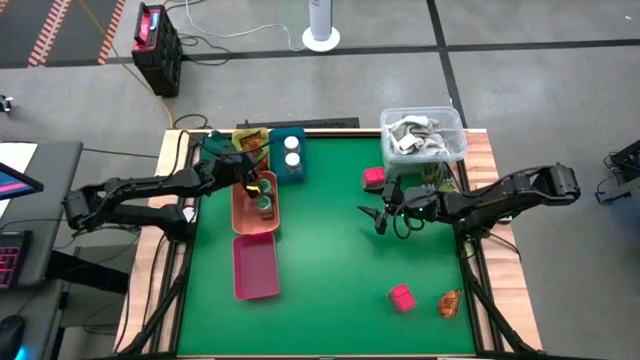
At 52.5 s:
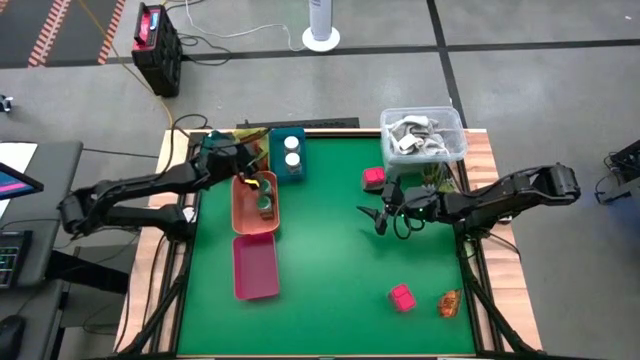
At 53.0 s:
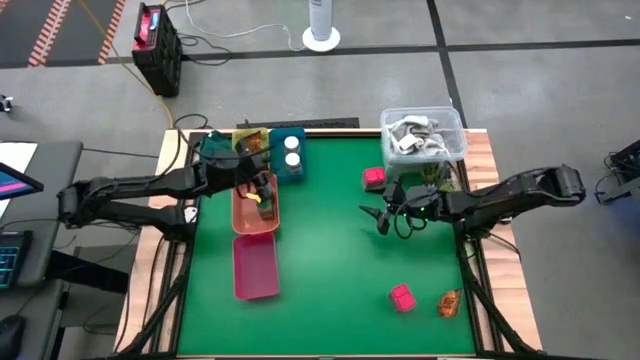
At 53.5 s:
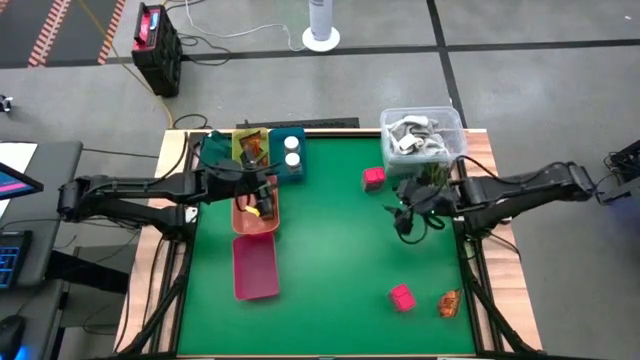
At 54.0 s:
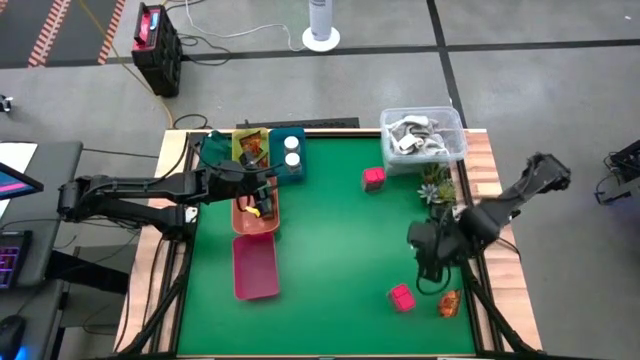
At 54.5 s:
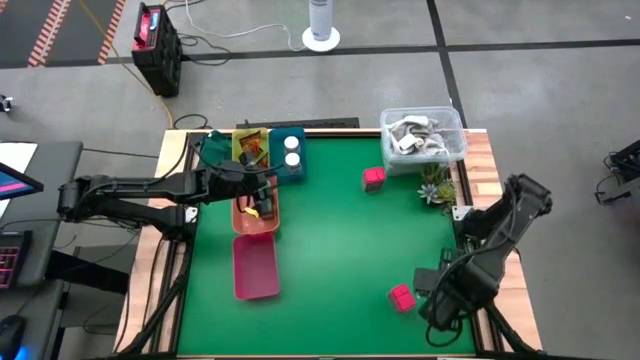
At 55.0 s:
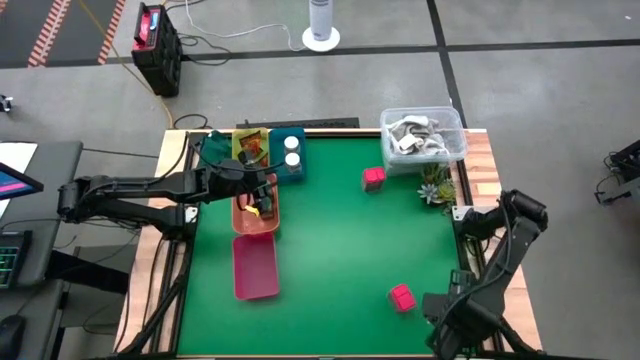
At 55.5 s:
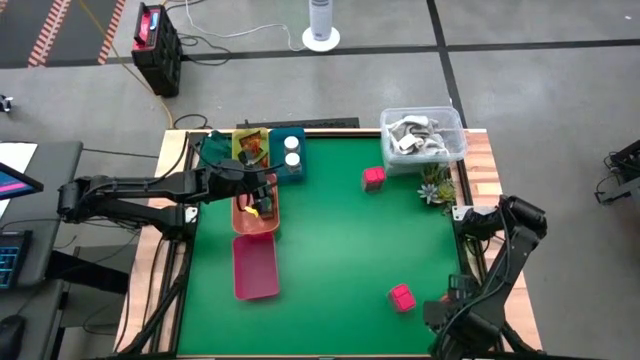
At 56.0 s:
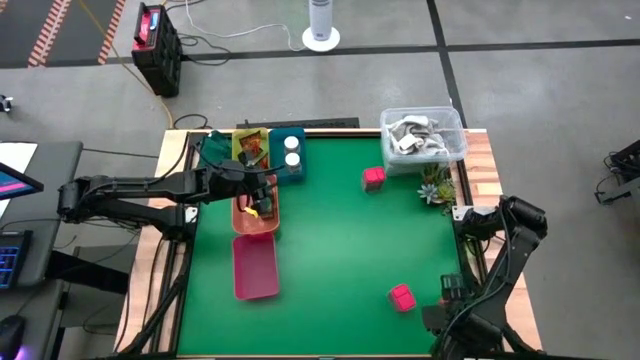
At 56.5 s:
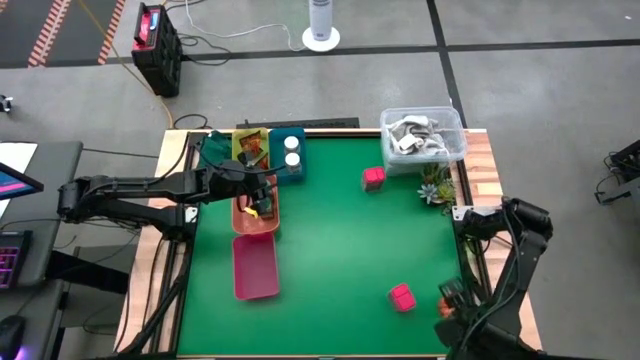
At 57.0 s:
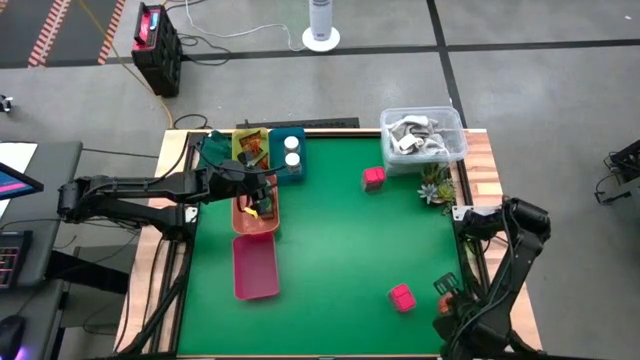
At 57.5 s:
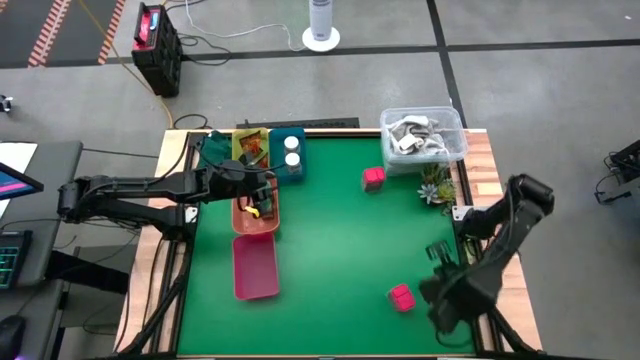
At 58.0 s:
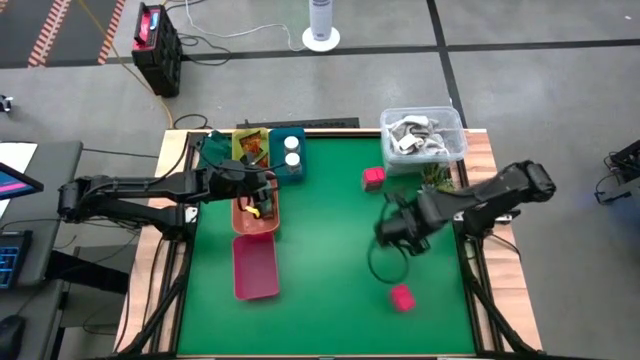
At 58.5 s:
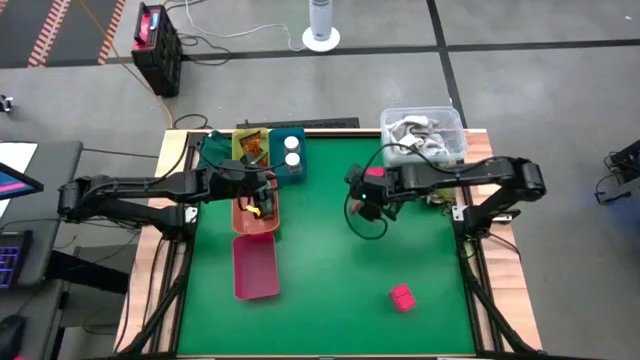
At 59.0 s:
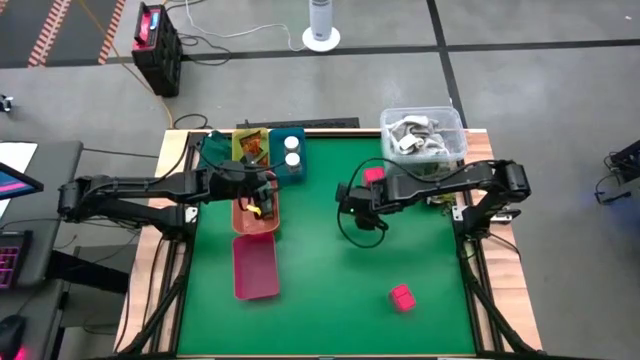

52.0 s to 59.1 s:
Task: Sort spices by type
Put the orange seasoning pack into the yellow bin

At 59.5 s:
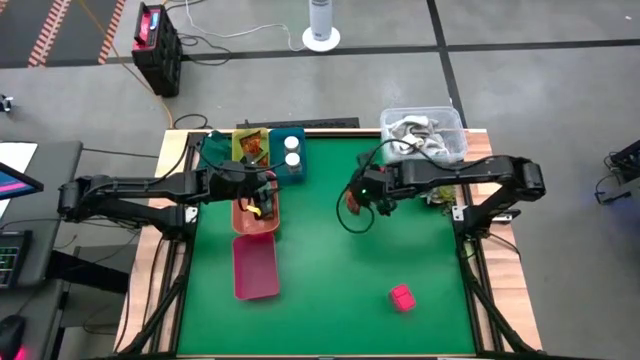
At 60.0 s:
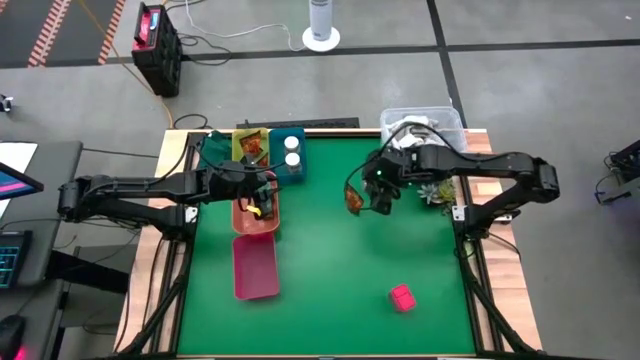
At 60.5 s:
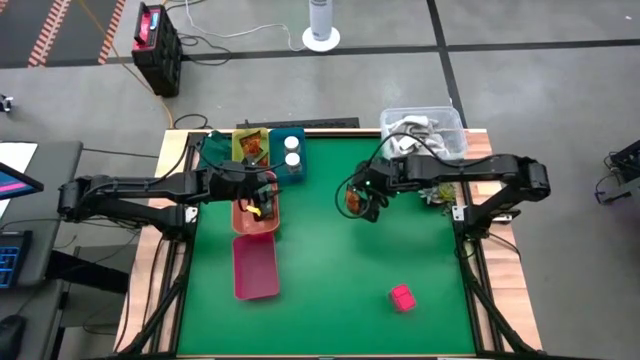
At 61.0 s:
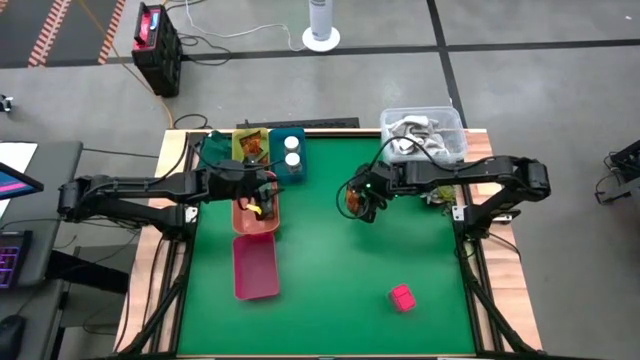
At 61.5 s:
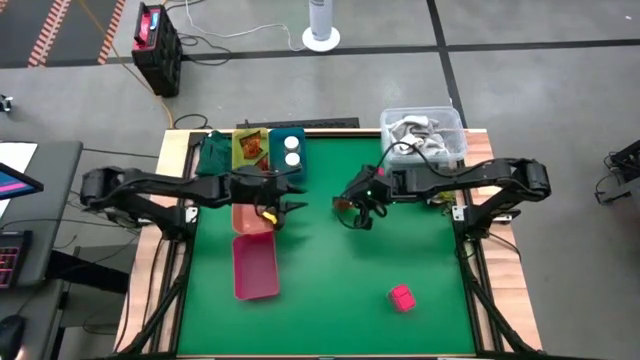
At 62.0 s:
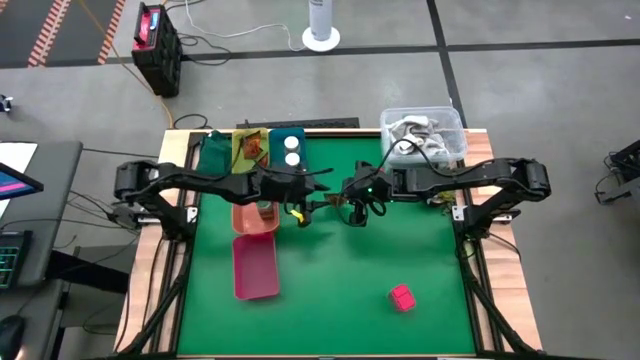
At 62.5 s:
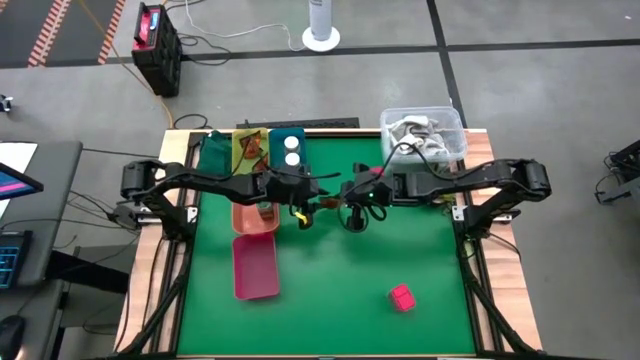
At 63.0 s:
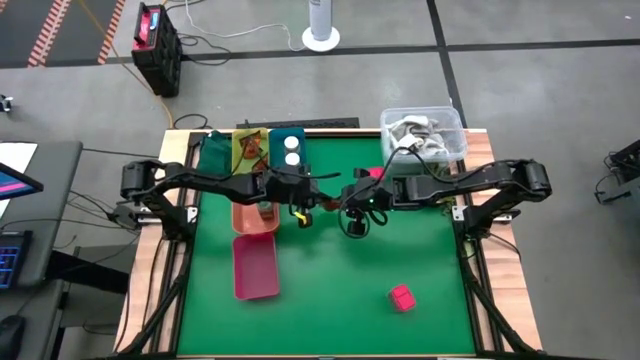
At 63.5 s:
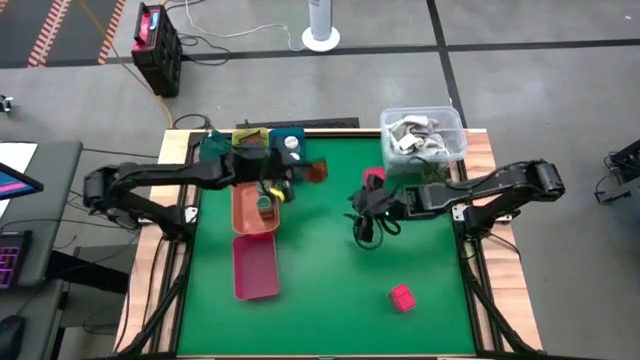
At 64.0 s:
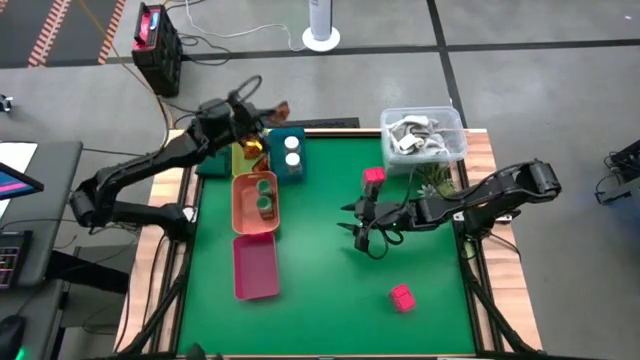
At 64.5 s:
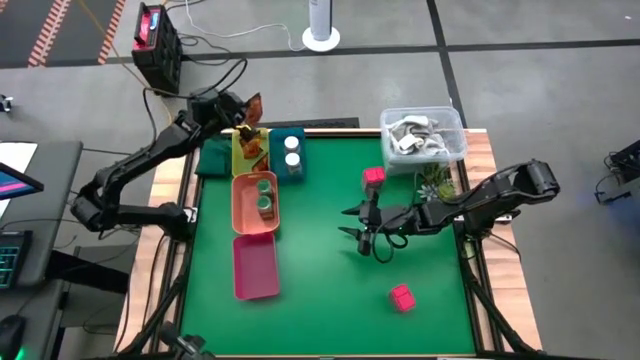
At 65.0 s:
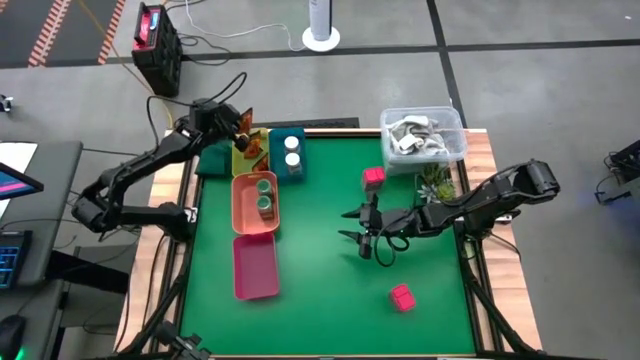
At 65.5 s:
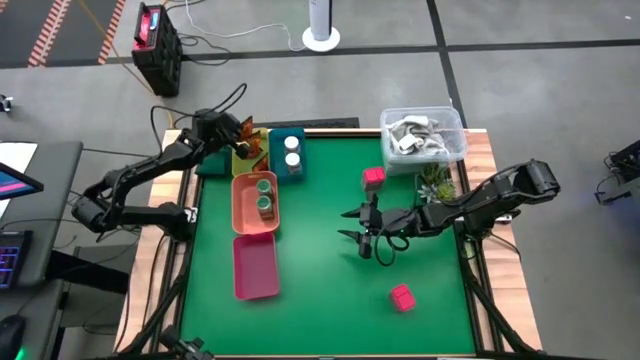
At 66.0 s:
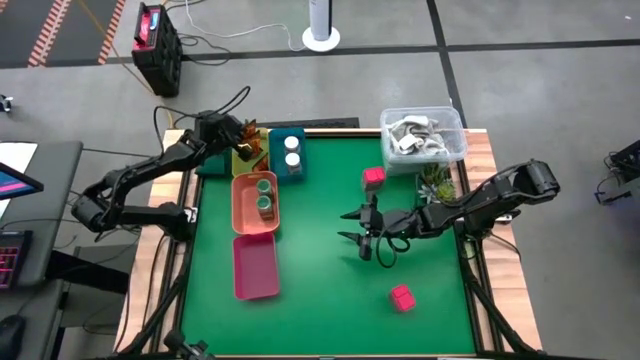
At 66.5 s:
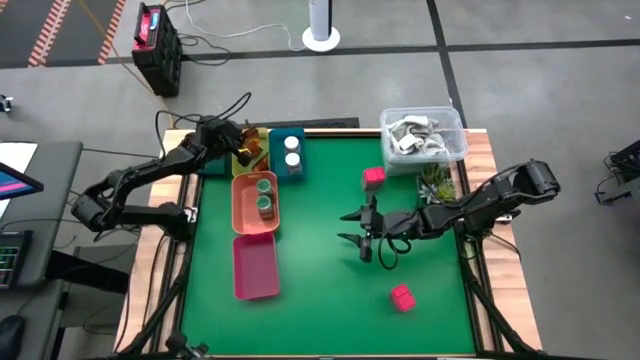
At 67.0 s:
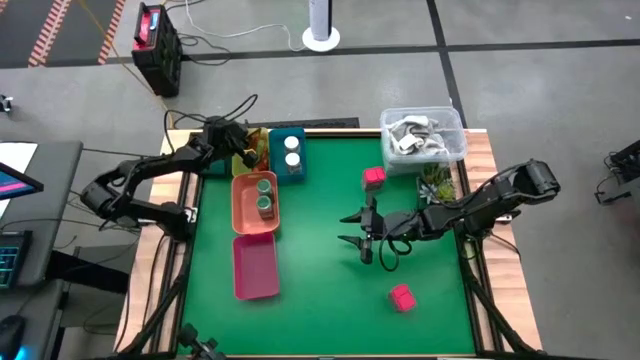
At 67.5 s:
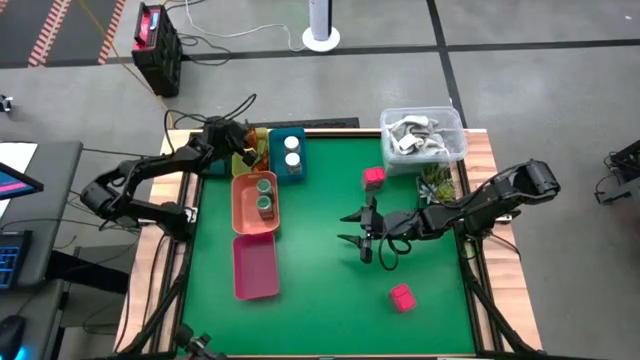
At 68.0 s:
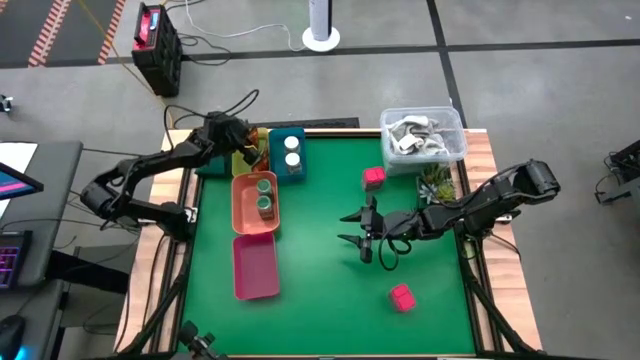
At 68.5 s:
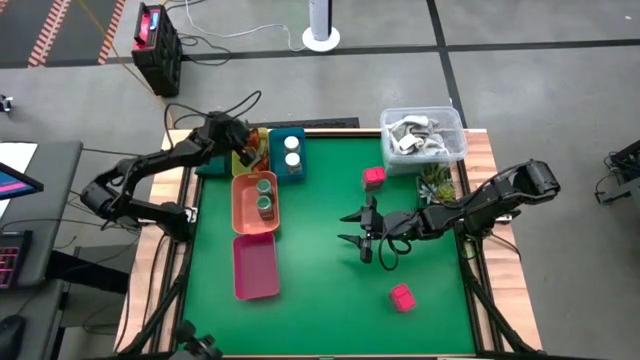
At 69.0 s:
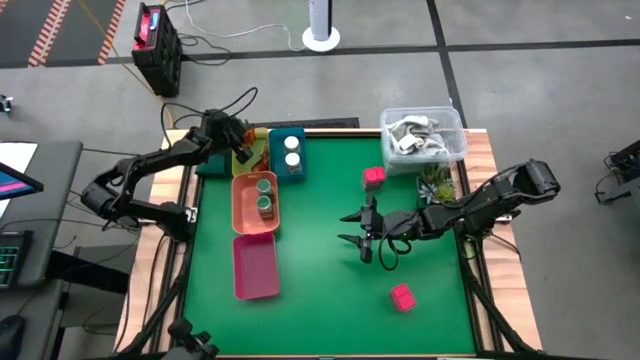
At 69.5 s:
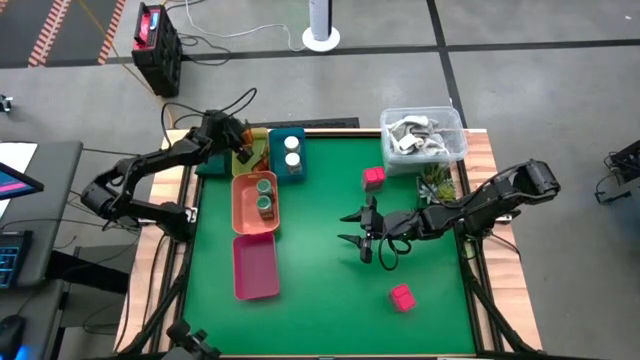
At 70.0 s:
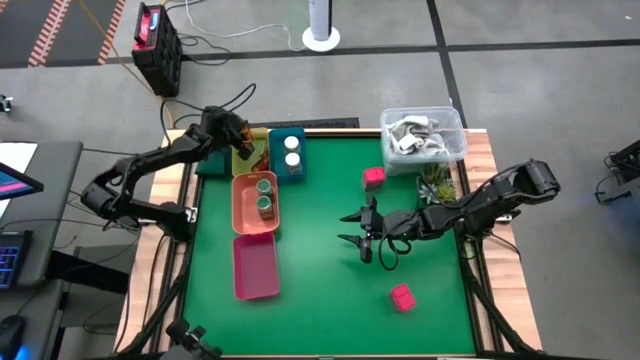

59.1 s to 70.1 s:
Put the orange seasoning pack into the yellow bin

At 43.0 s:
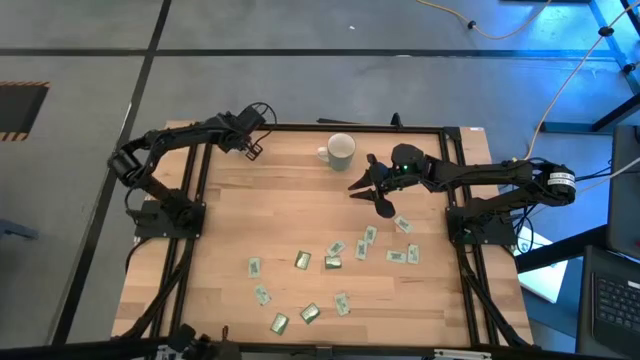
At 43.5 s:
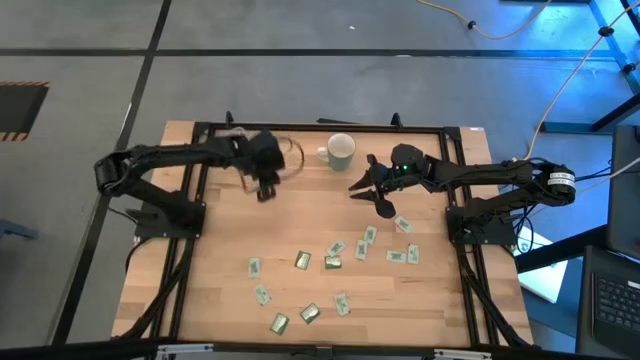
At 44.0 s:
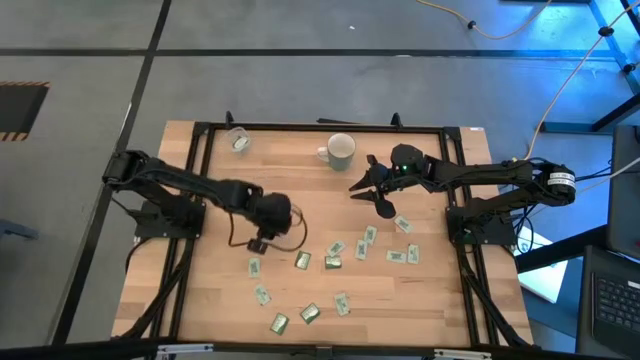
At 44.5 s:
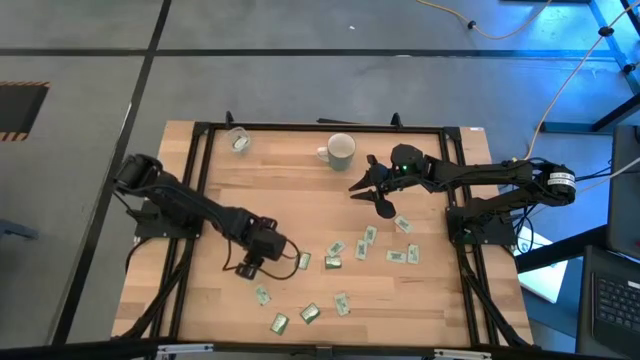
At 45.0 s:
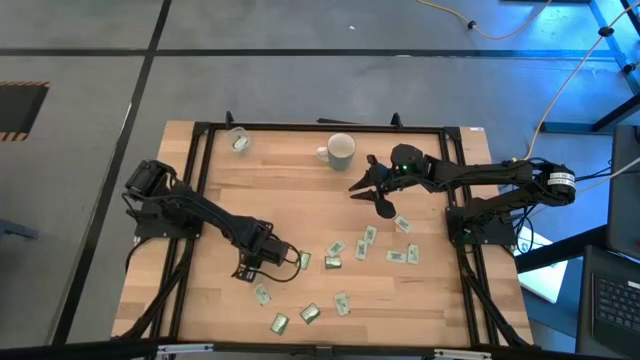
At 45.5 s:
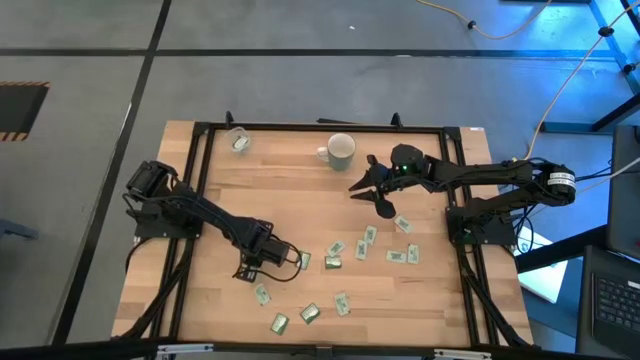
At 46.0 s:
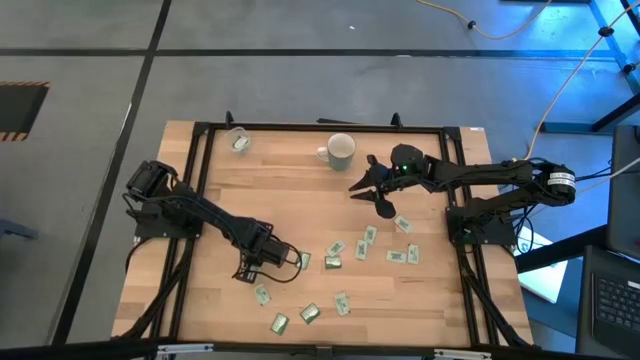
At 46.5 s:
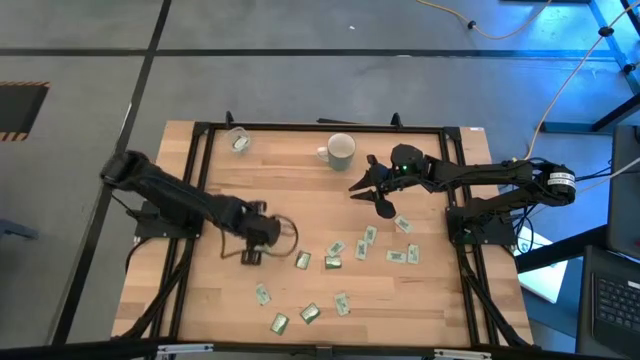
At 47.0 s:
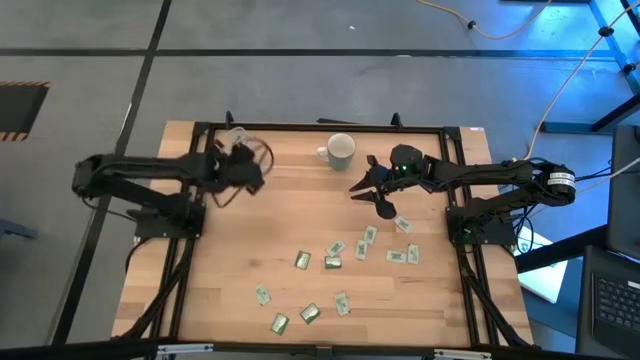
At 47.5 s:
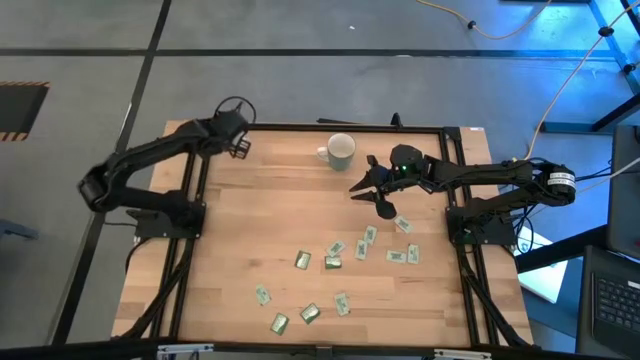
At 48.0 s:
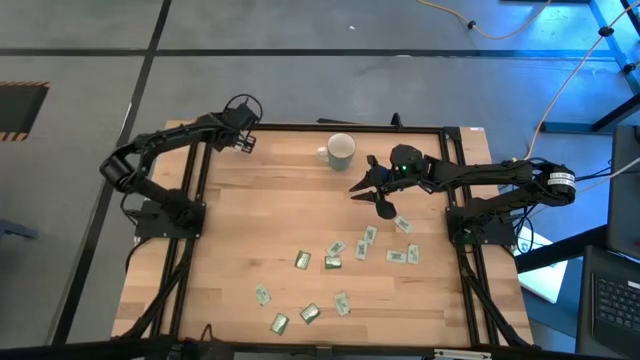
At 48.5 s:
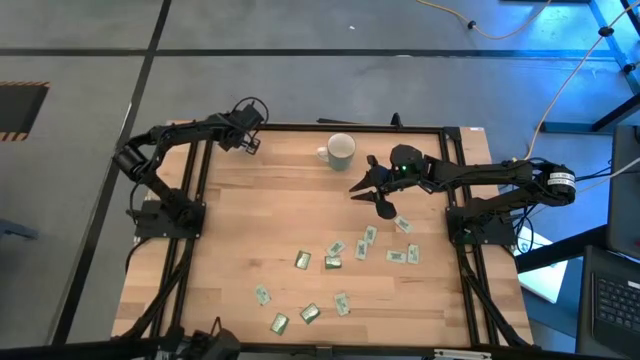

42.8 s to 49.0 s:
Task: Pick and place Stevia / Truvia into bins
Put the stevia packet into the transparent bin
